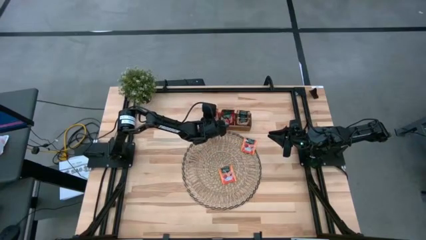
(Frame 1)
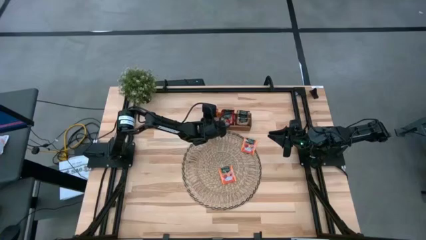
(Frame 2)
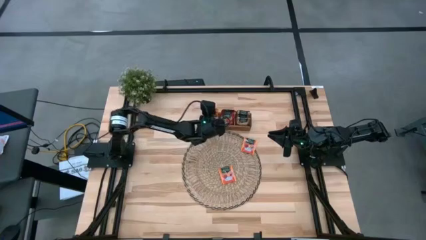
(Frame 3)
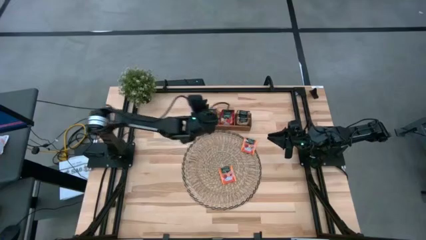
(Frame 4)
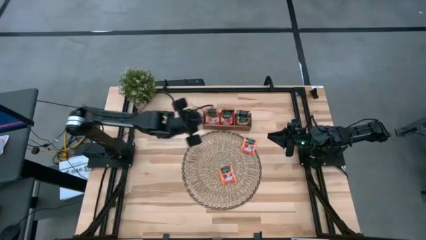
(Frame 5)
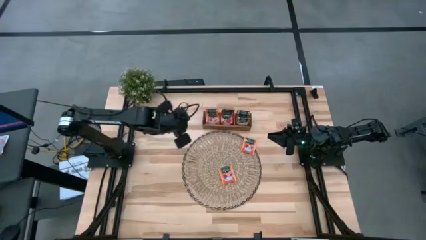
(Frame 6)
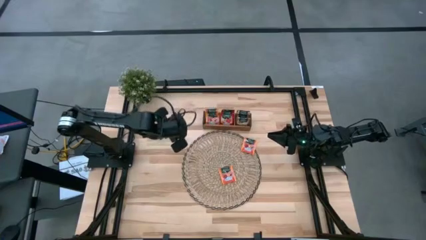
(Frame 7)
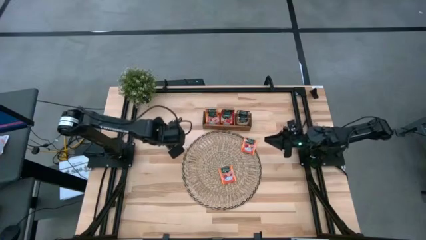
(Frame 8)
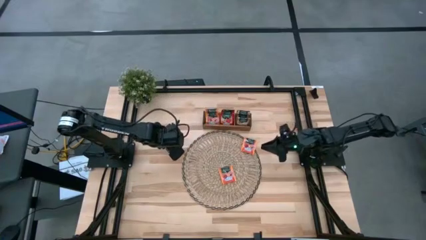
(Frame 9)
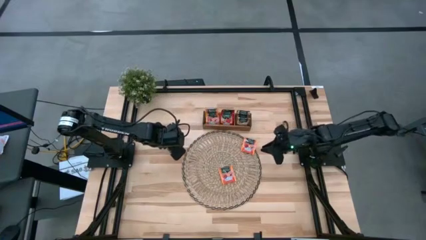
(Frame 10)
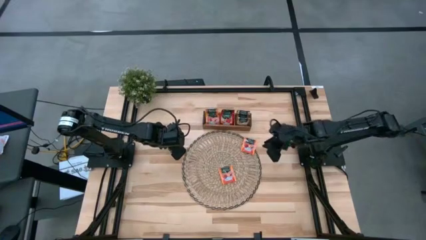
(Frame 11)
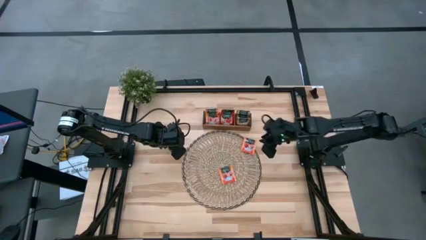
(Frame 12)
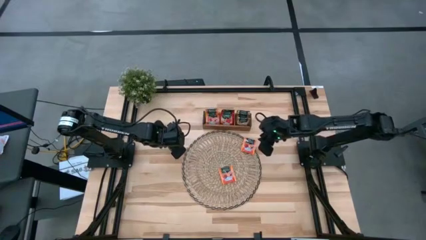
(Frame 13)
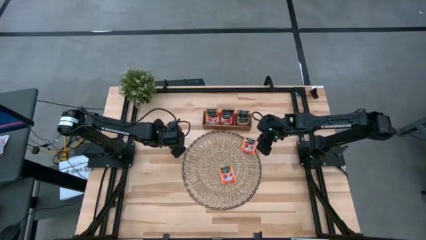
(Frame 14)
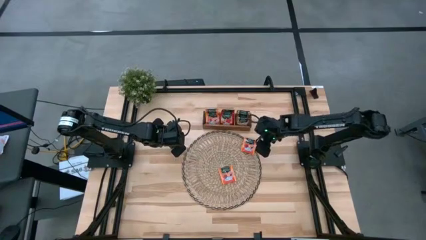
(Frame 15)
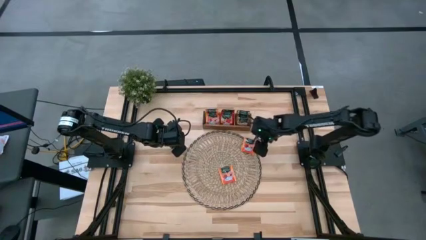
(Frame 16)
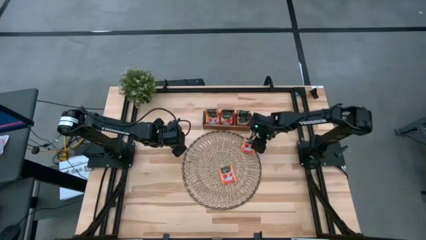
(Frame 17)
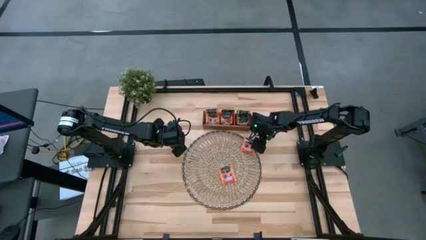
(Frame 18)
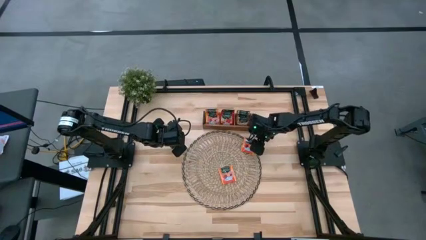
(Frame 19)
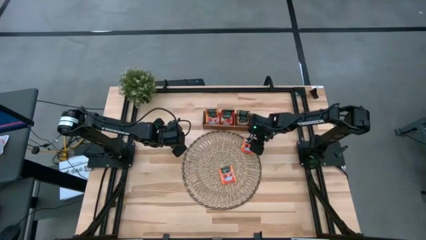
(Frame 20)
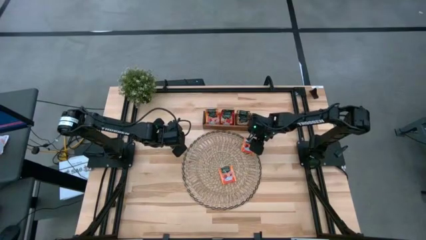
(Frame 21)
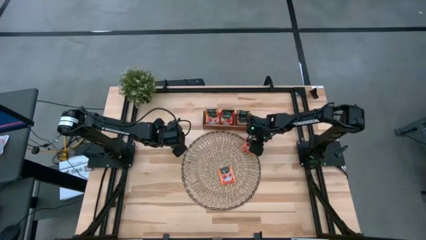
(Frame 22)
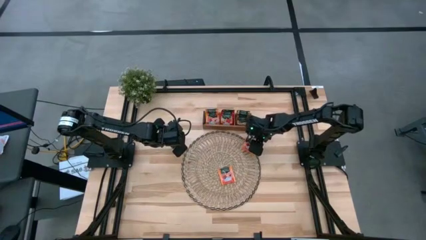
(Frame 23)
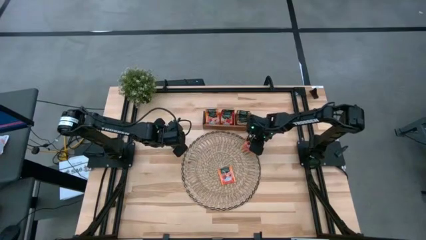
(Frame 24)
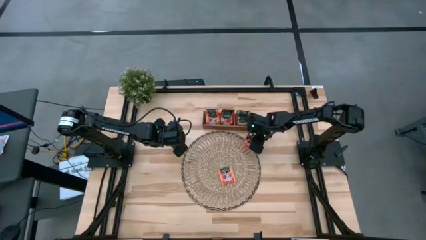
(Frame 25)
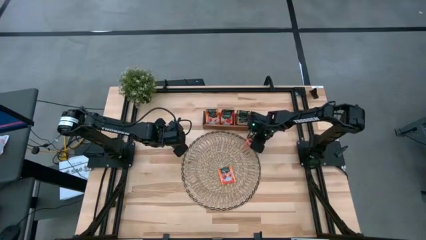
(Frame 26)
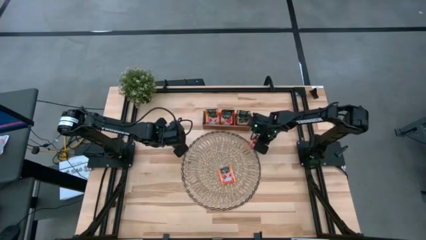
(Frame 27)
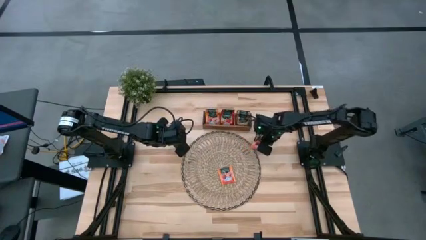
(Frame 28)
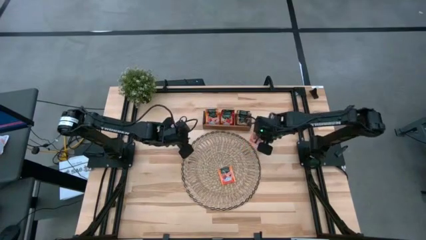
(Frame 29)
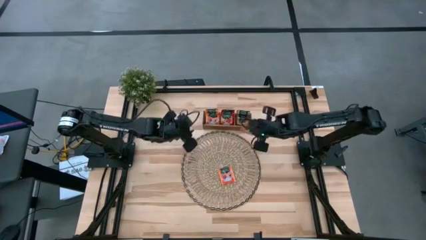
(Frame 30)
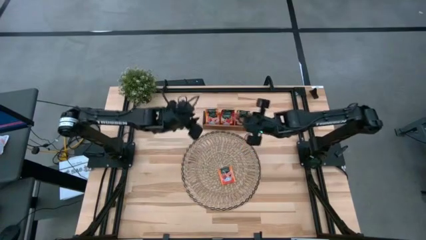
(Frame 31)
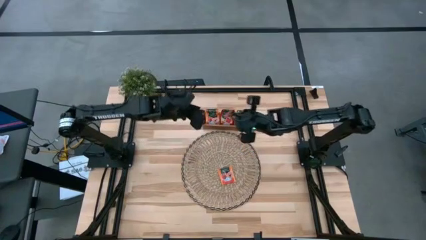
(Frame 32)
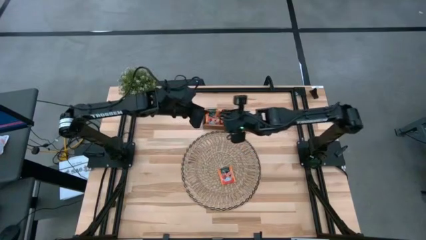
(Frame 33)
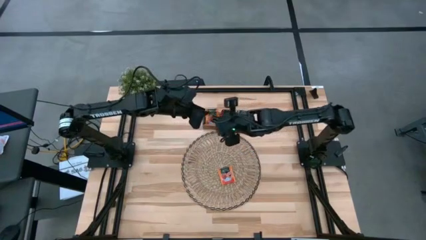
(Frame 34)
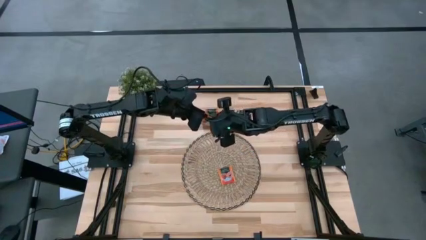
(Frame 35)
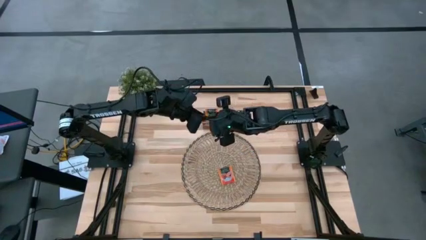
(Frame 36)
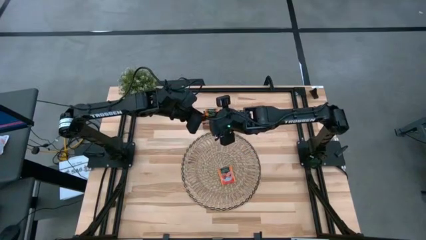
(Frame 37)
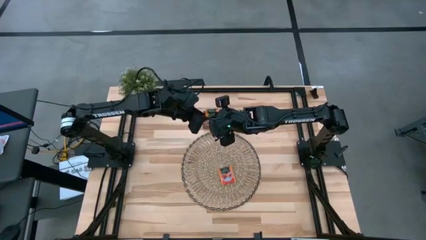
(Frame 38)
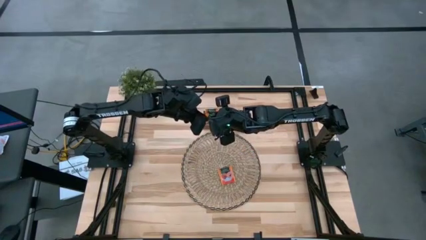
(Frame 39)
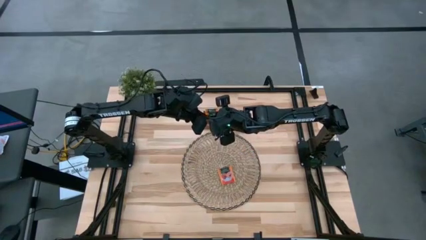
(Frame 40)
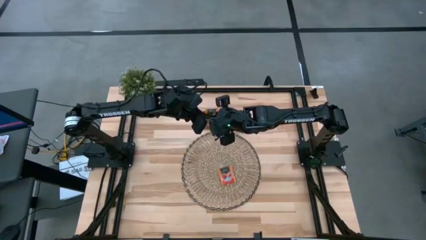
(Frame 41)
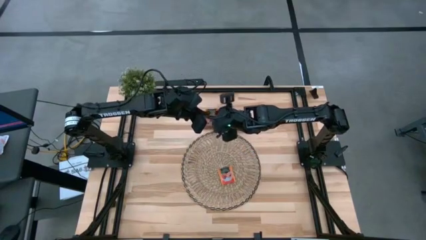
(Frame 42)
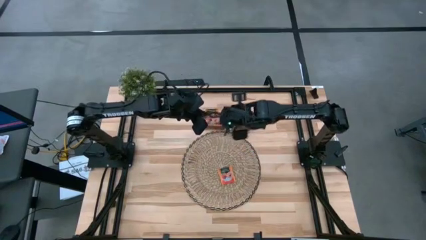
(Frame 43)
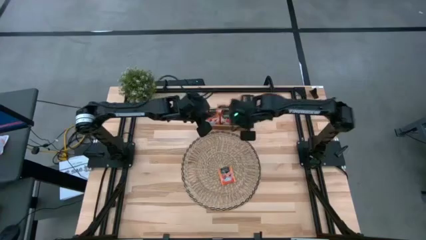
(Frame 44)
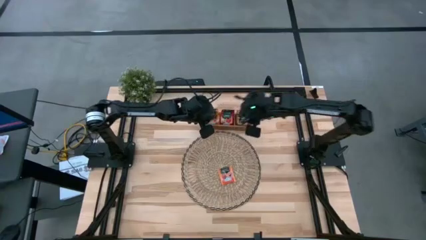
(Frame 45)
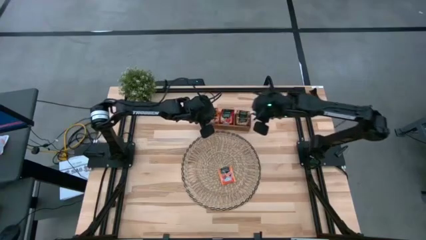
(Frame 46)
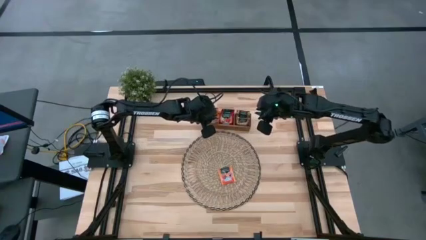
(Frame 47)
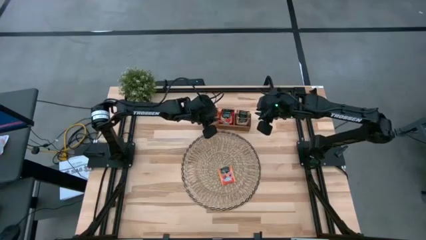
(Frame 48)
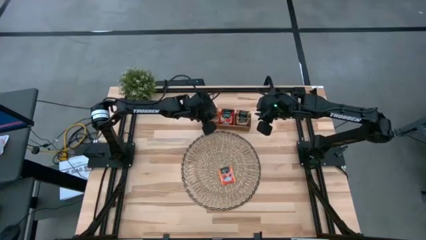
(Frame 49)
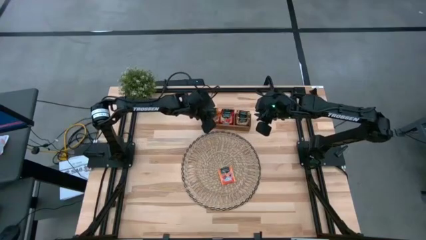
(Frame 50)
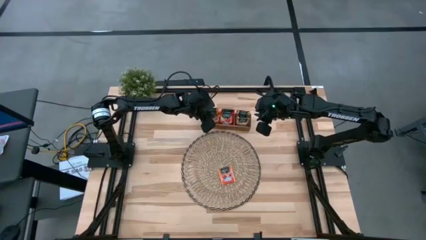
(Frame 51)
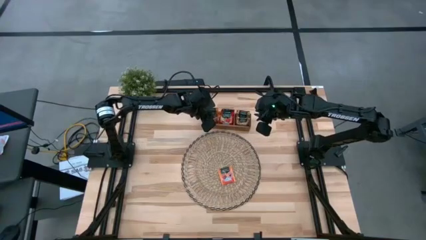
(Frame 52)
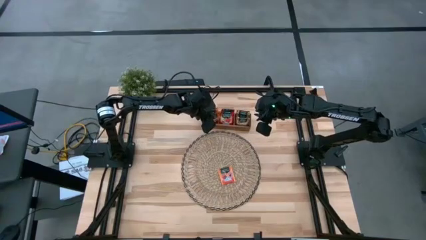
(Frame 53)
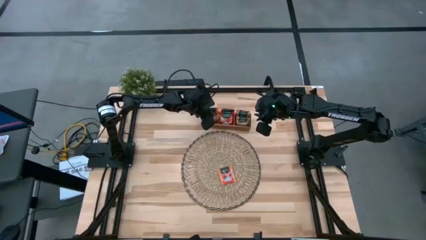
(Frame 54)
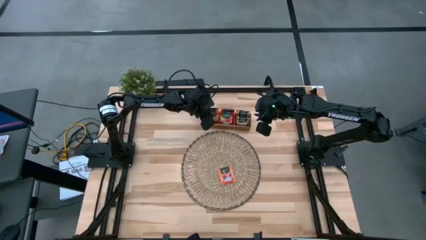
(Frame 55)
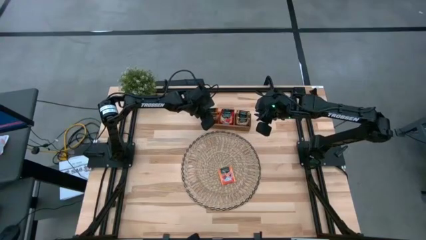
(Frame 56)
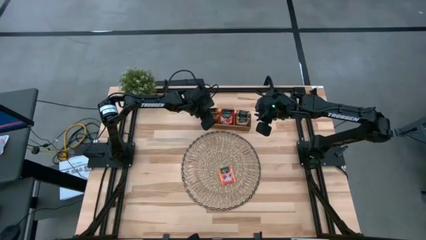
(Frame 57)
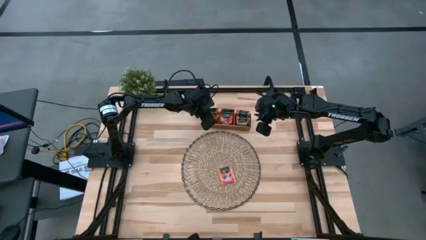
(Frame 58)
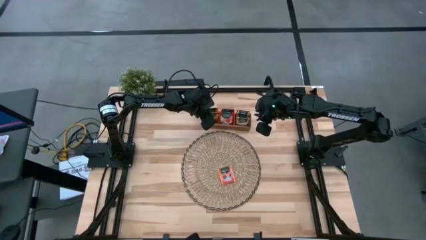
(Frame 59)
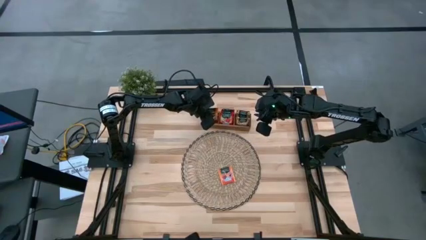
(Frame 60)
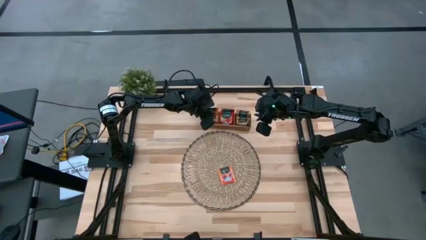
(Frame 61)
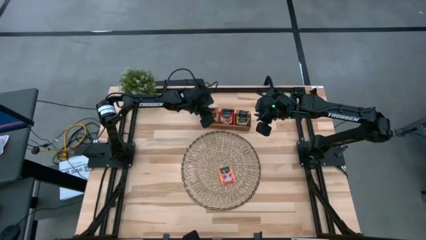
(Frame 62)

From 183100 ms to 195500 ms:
Task: Pick & Place Tea
Put the orange tea bag into the left section of the wooden organizer
